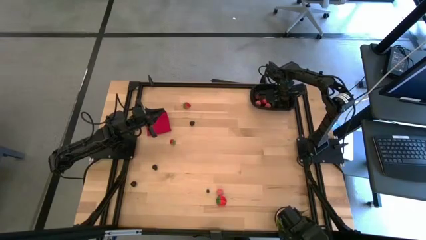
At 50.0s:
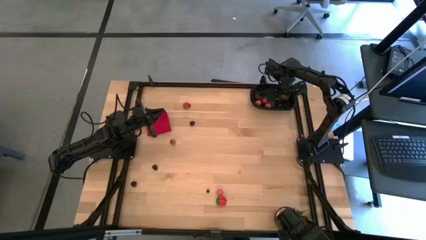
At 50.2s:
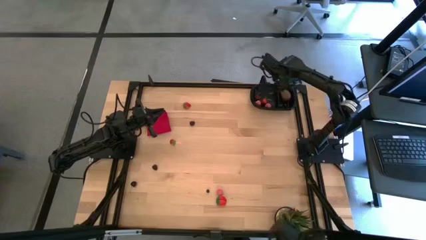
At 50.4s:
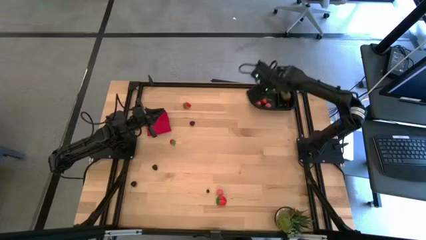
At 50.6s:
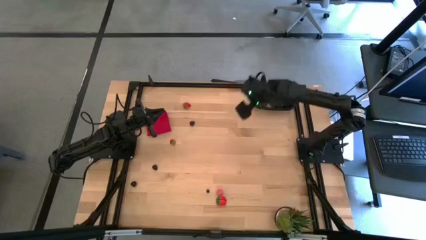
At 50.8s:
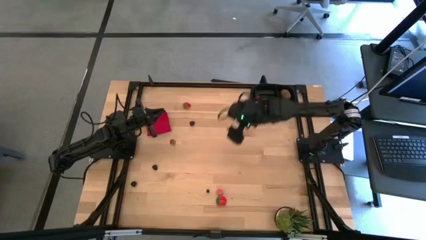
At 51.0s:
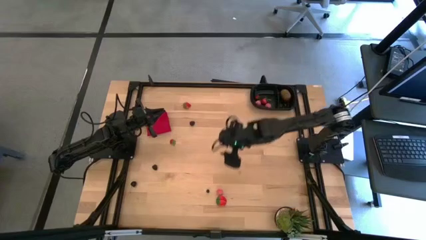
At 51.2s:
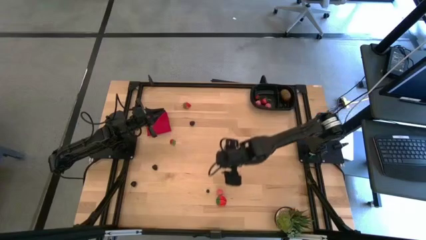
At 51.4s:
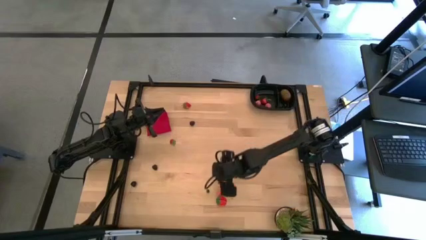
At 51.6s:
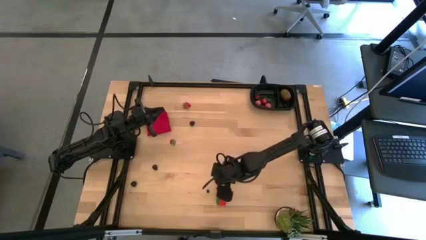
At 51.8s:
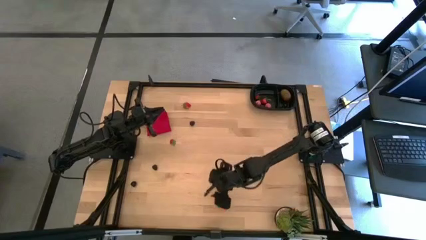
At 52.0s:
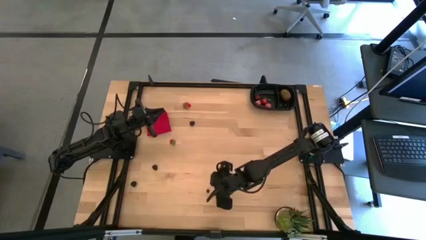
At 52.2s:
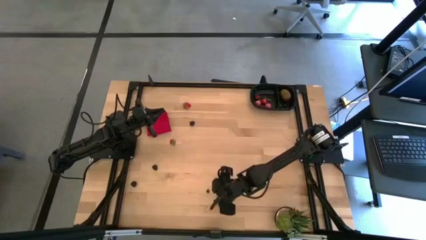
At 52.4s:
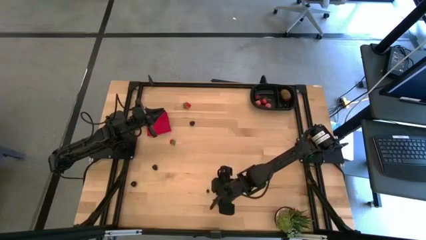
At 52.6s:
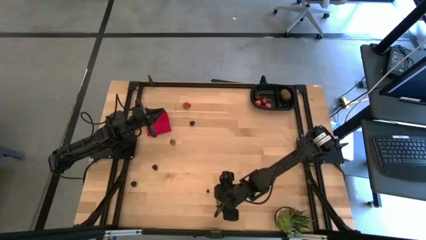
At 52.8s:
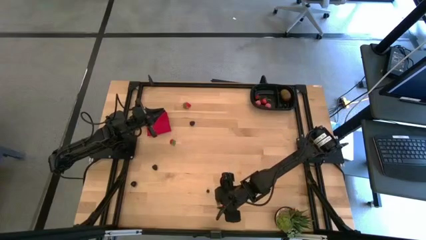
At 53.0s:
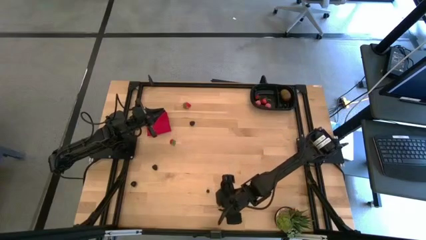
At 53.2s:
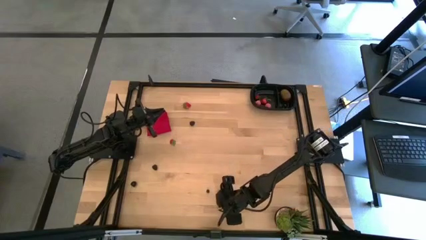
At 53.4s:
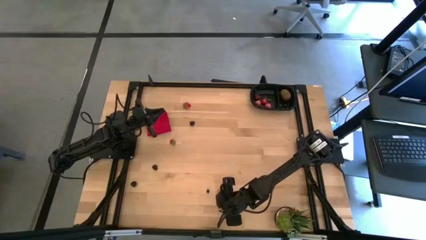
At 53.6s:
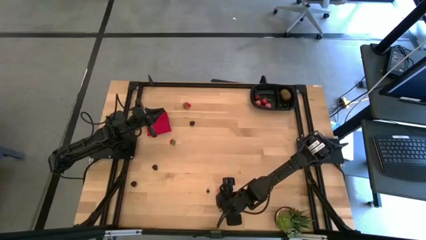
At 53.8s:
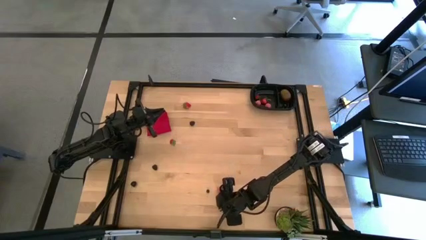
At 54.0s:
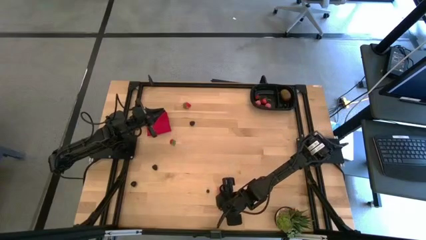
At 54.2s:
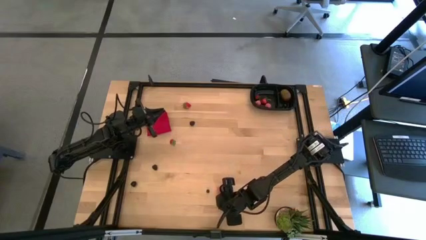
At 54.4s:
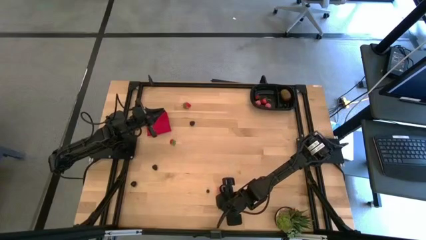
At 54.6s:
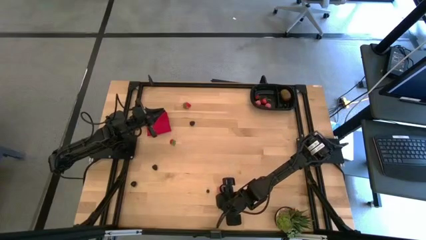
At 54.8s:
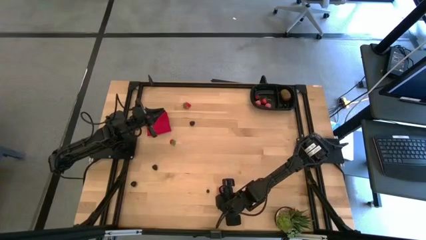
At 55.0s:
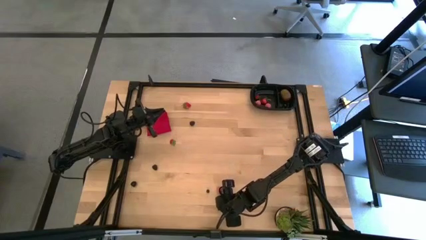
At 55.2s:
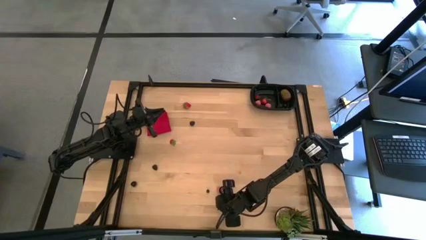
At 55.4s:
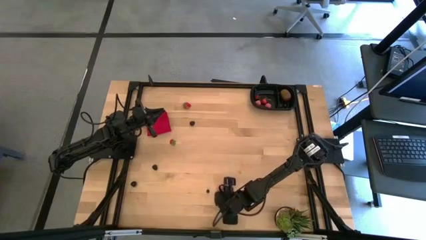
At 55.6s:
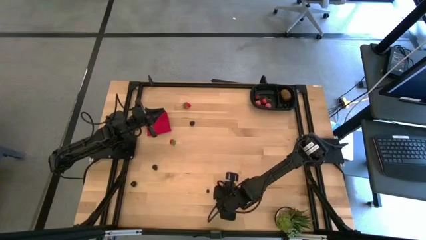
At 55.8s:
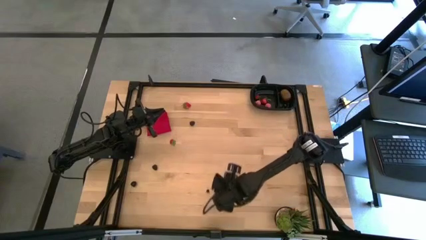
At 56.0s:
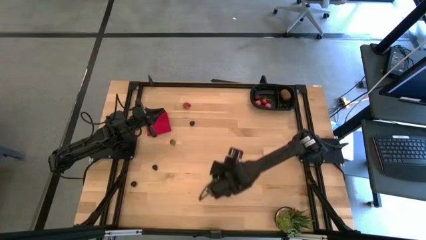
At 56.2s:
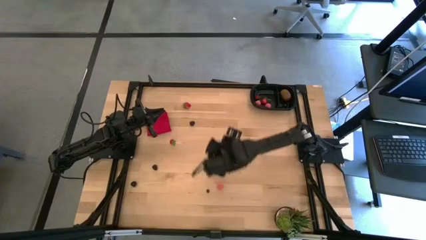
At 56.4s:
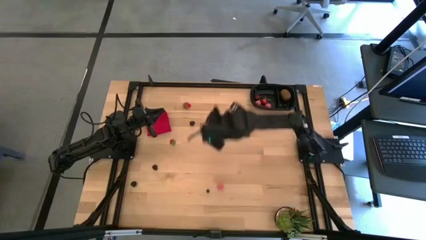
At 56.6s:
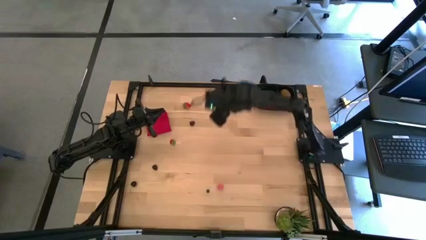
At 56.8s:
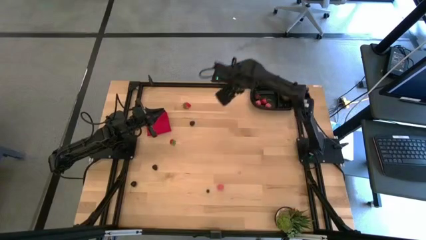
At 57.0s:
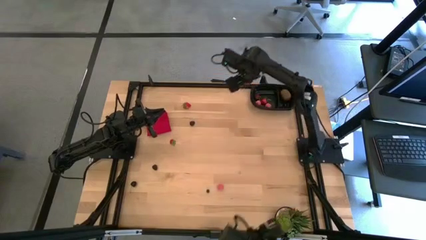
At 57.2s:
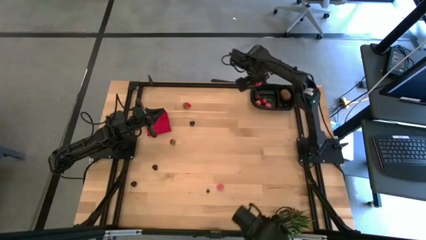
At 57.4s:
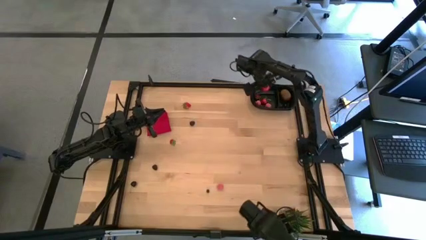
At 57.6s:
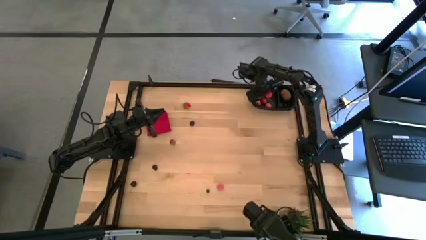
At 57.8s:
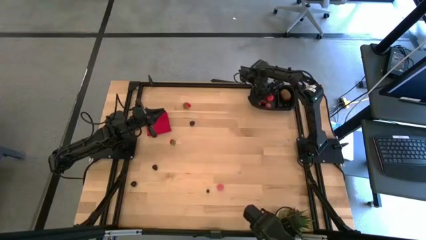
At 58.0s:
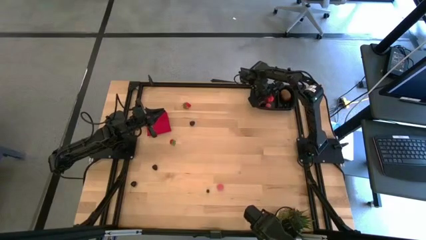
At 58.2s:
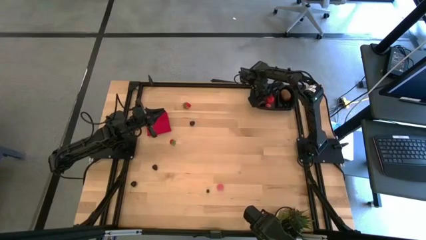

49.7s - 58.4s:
Task: Pick and placing Produce into tupperware
Put the red strawberry into the black bin

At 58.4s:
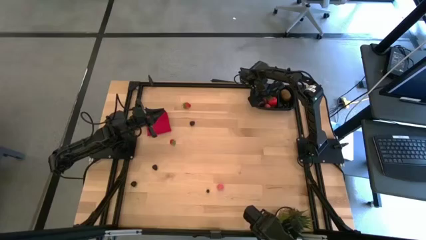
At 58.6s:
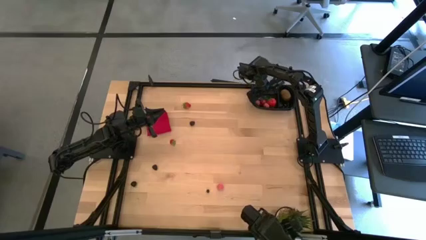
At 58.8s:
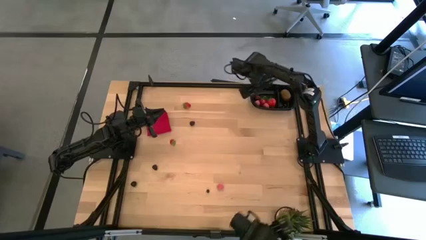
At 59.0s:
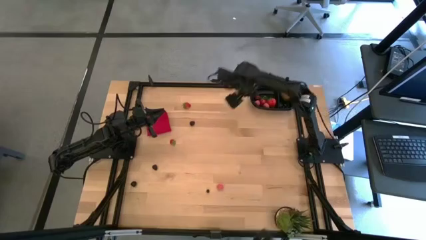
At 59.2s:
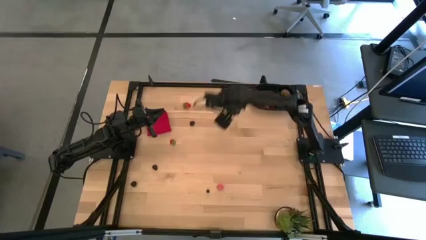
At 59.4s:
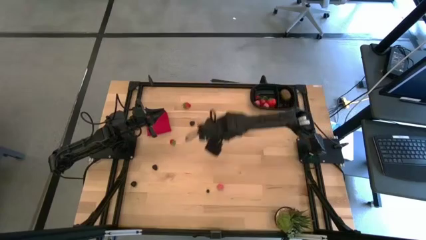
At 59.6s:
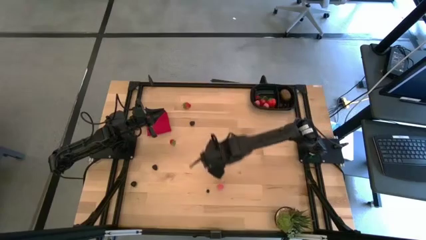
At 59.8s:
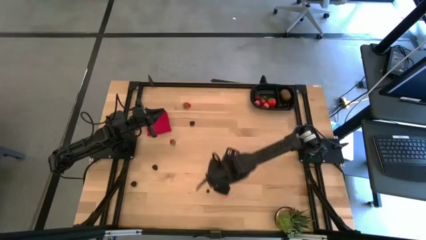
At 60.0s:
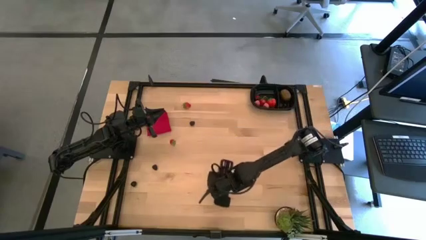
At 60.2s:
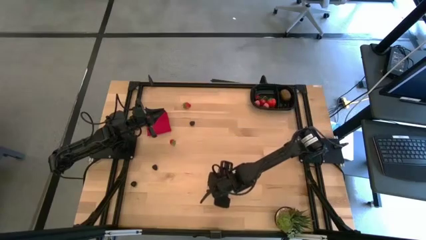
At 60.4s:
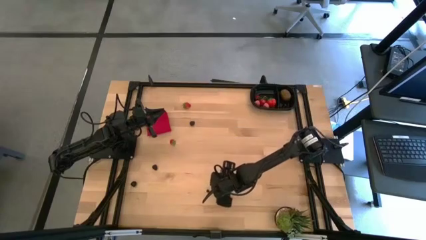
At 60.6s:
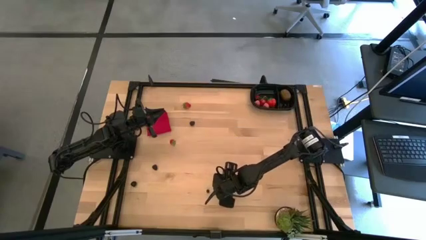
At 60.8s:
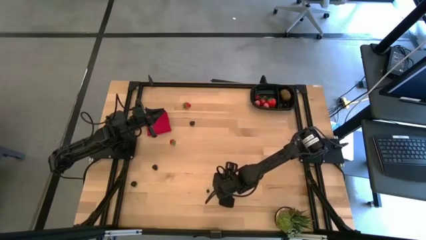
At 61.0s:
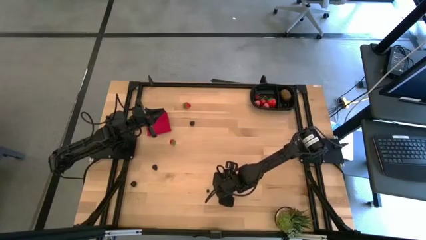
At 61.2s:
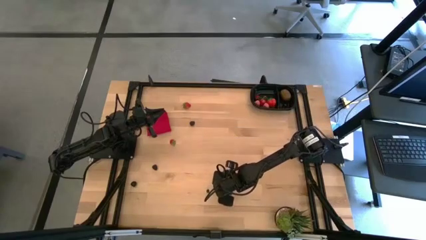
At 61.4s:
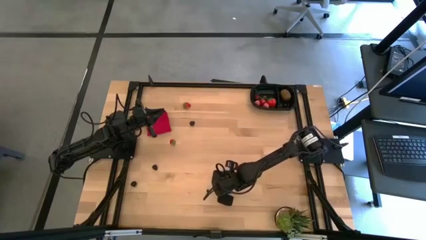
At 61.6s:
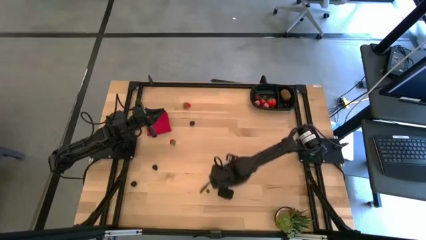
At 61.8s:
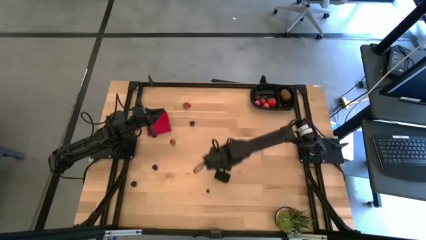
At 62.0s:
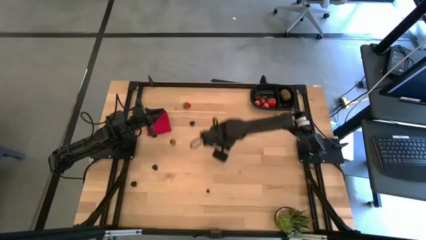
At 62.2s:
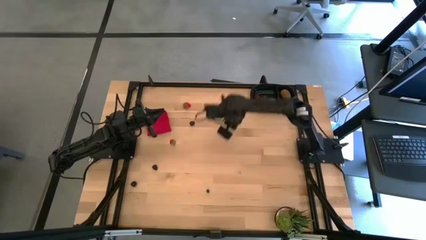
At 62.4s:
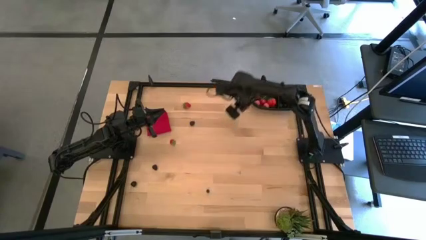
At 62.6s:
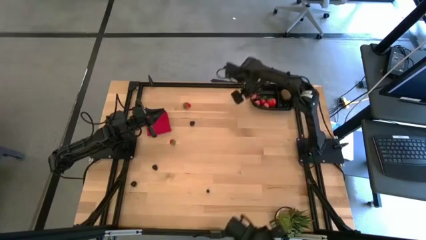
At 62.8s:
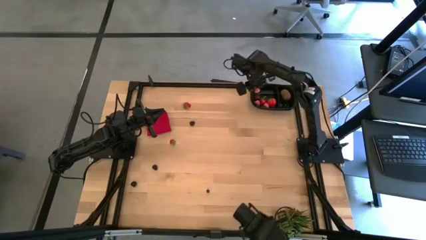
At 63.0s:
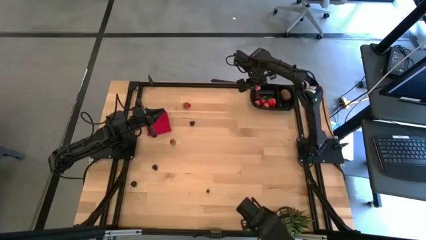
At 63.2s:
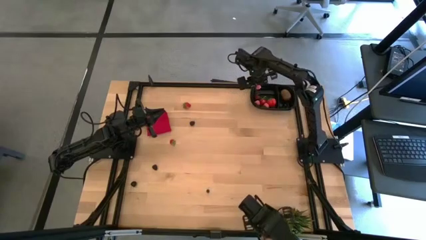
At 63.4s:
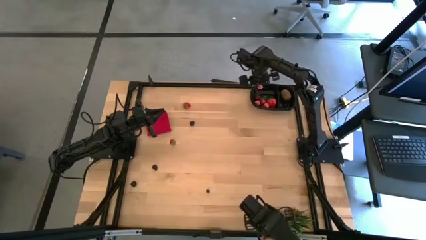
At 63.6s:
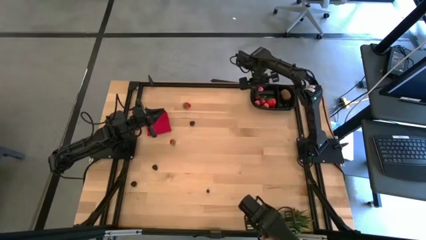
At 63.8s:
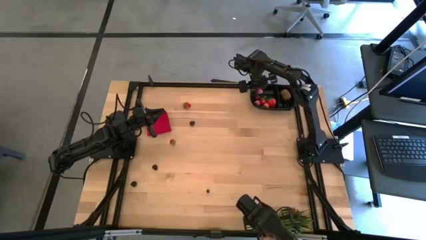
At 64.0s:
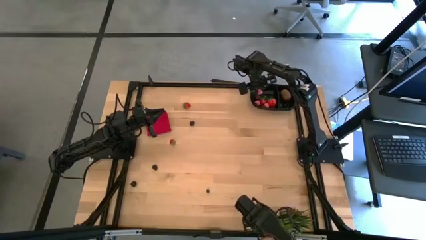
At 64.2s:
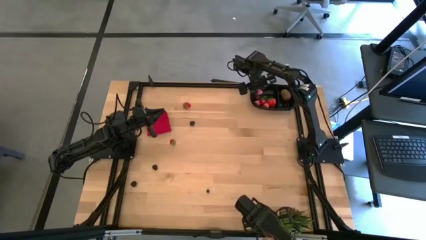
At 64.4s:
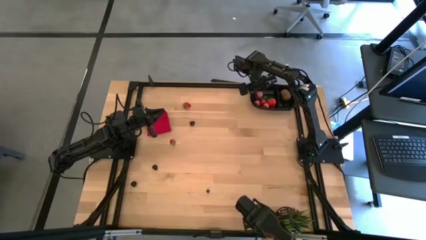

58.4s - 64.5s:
Put the pink peach into the black bin

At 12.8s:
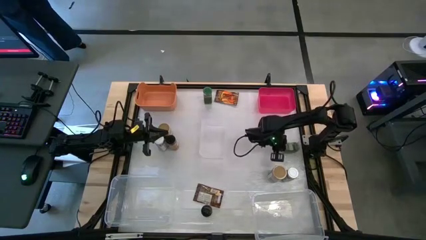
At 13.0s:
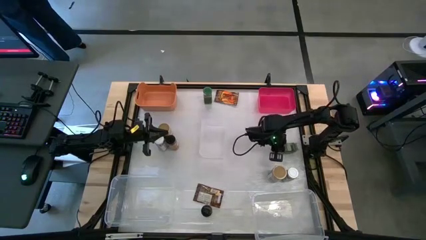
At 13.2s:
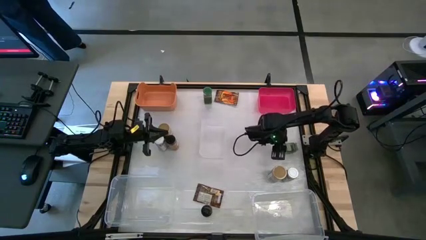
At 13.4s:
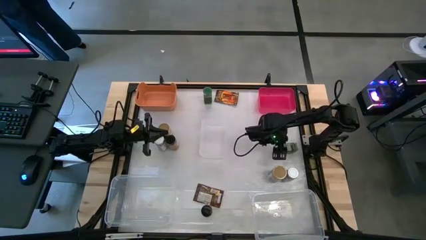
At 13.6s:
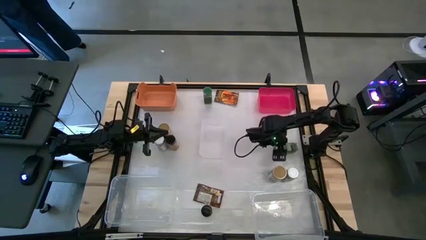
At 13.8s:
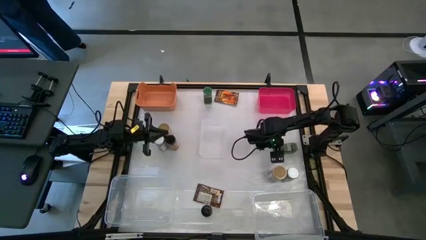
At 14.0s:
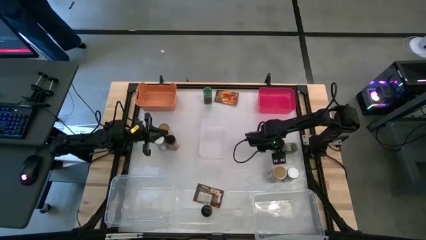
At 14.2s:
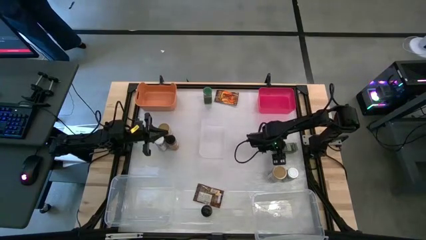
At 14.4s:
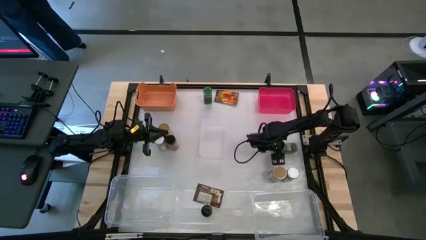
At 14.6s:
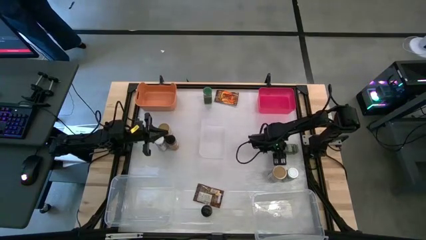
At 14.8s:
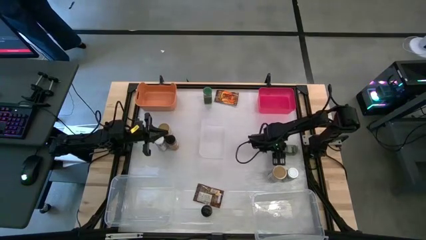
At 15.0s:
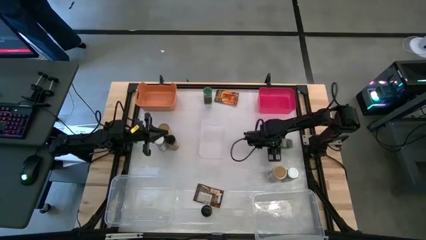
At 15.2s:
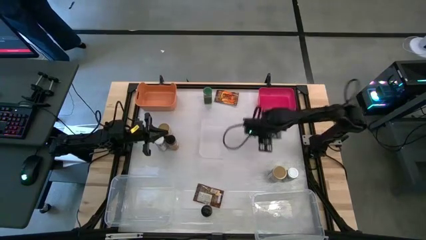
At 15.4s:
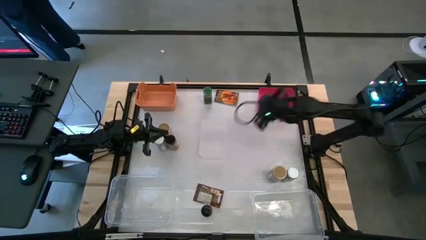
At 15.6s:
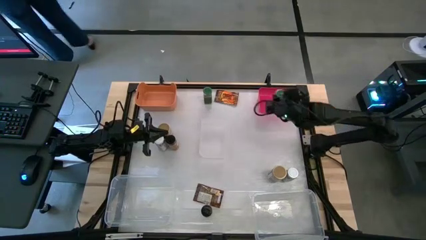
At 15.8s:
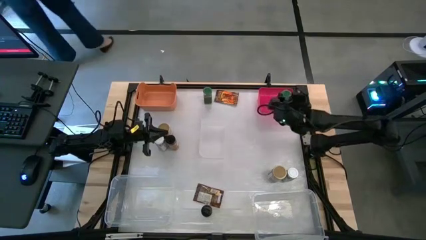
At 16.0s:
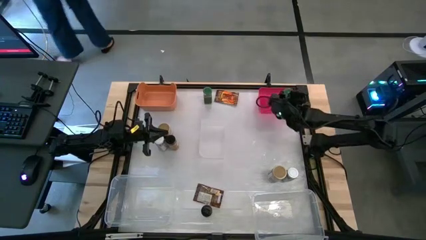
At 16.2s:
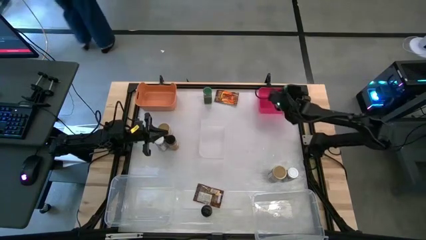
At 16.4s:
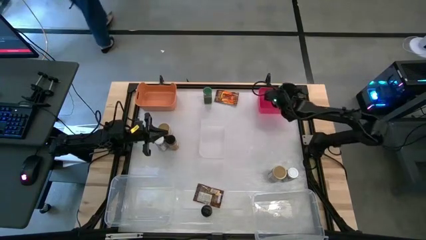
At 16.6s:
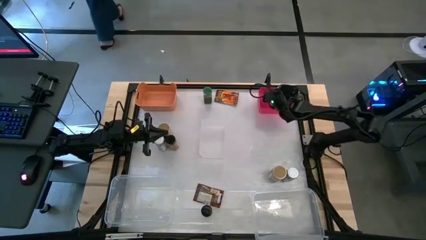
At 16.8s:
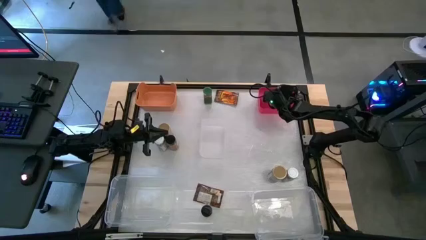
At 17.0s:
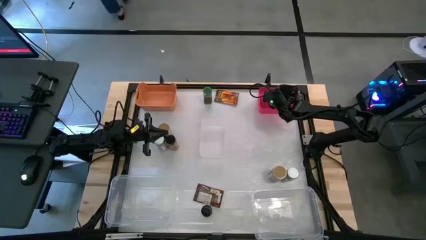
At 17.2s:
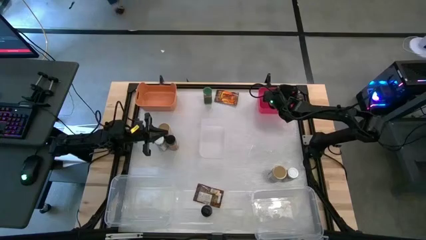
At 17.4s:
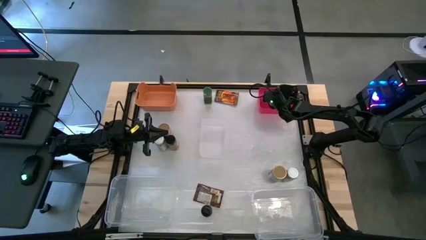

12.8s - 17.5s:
Task: Sort spices by type
Put the bottom green seasoning bottle into the red bin
